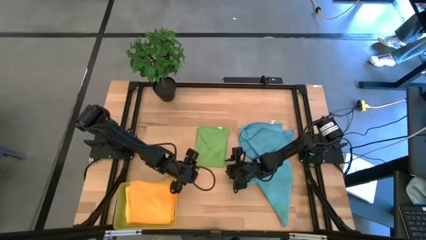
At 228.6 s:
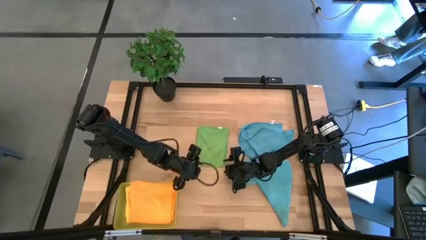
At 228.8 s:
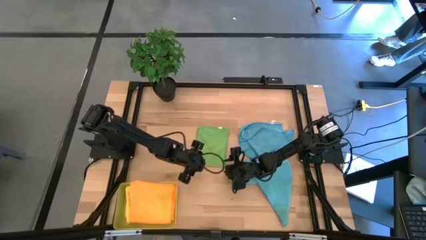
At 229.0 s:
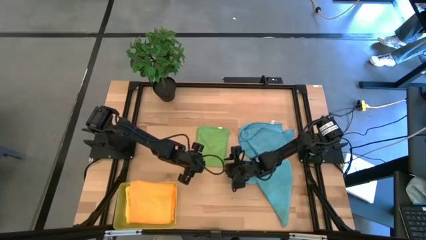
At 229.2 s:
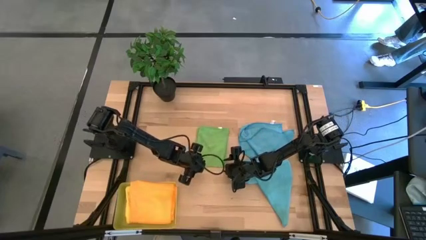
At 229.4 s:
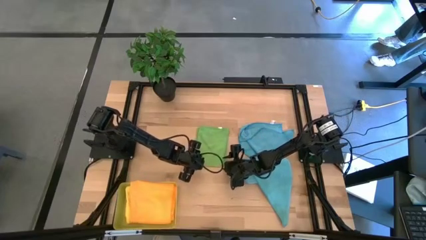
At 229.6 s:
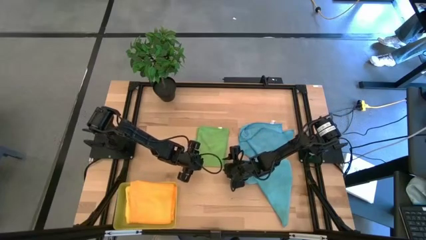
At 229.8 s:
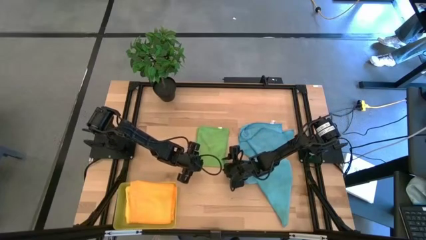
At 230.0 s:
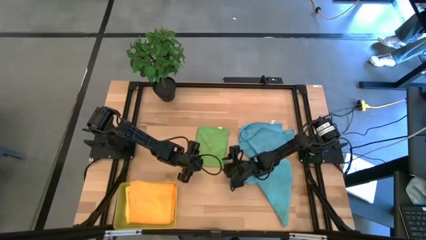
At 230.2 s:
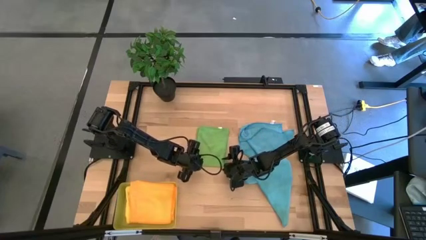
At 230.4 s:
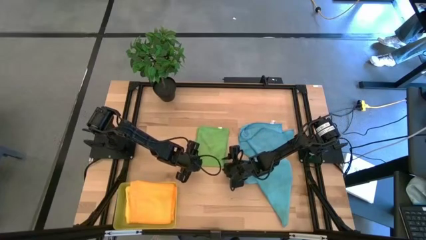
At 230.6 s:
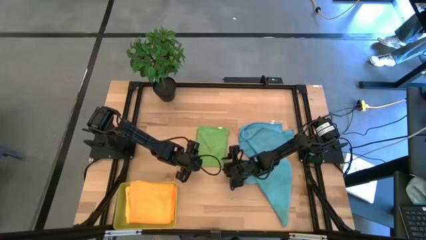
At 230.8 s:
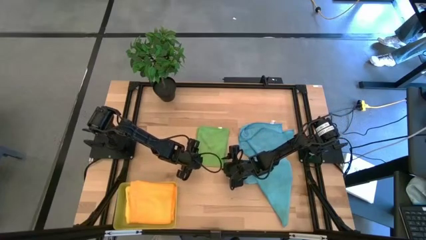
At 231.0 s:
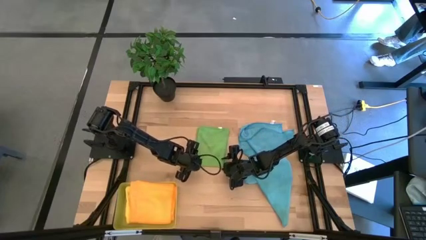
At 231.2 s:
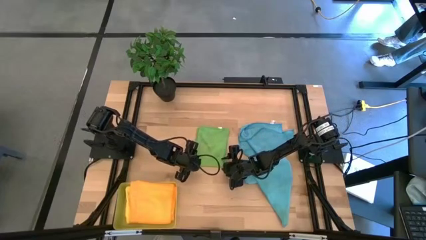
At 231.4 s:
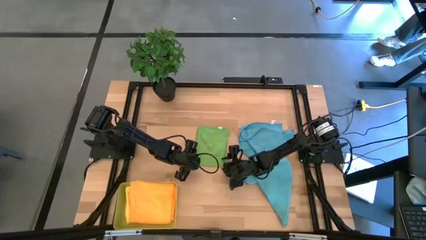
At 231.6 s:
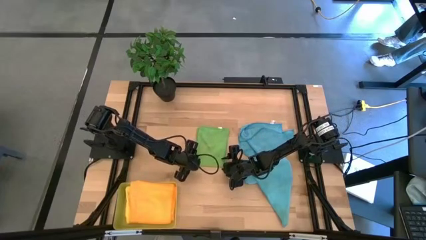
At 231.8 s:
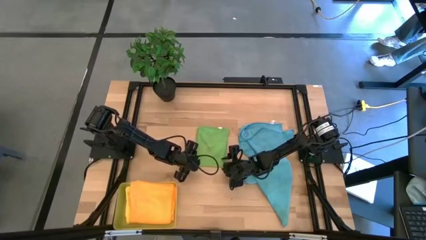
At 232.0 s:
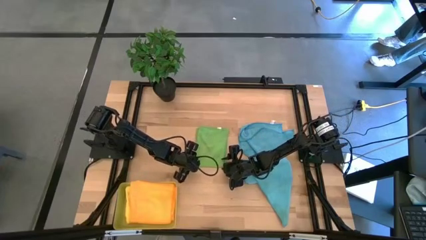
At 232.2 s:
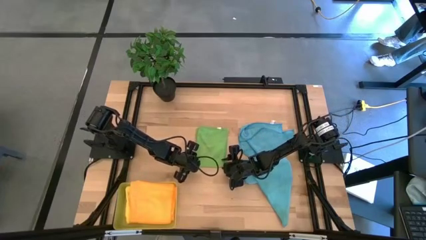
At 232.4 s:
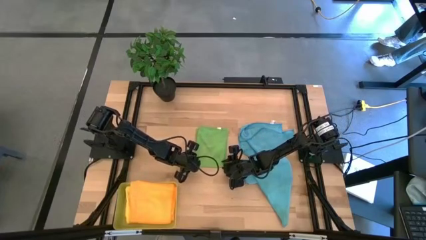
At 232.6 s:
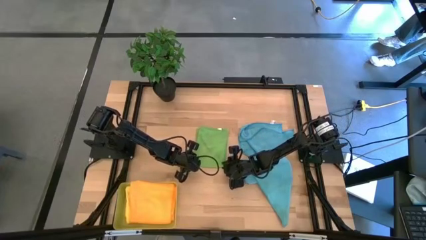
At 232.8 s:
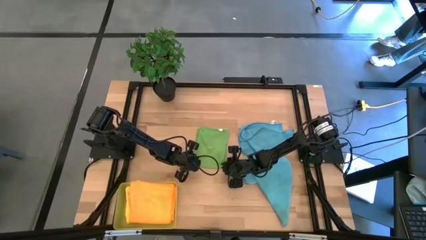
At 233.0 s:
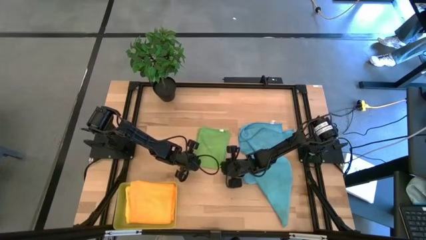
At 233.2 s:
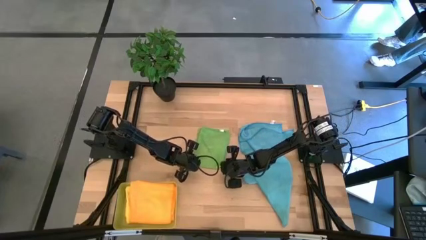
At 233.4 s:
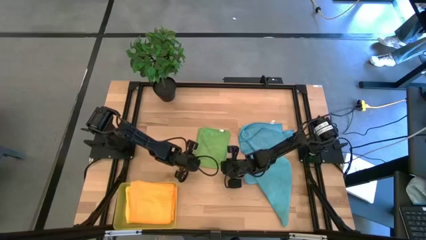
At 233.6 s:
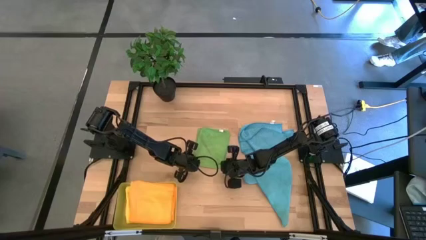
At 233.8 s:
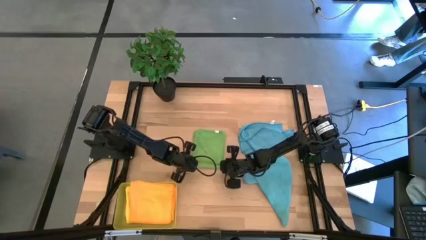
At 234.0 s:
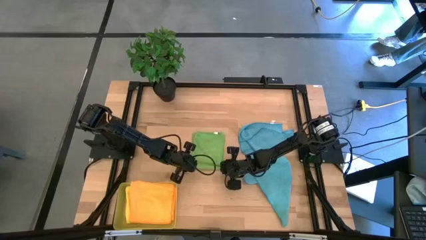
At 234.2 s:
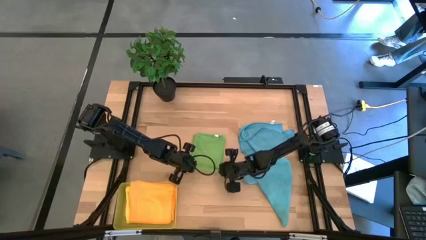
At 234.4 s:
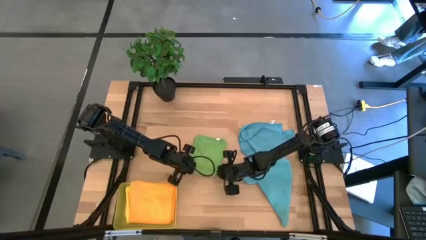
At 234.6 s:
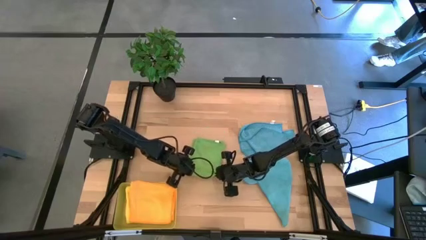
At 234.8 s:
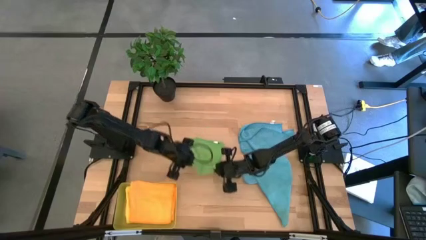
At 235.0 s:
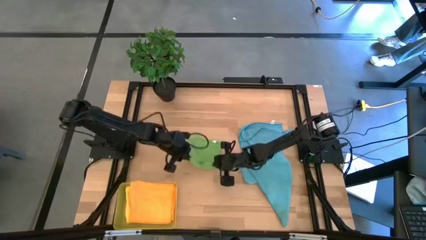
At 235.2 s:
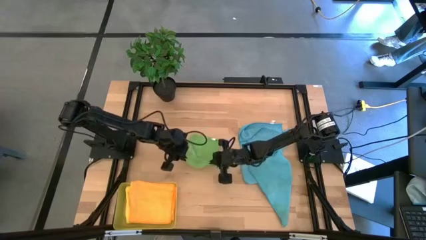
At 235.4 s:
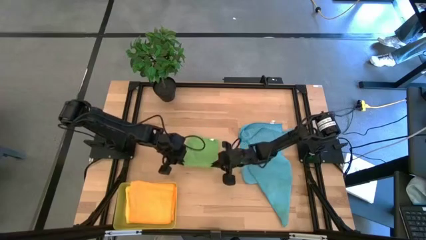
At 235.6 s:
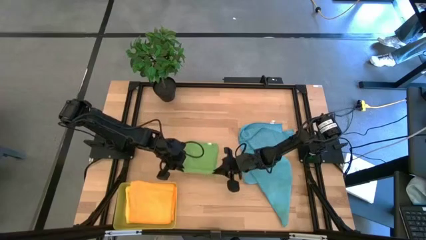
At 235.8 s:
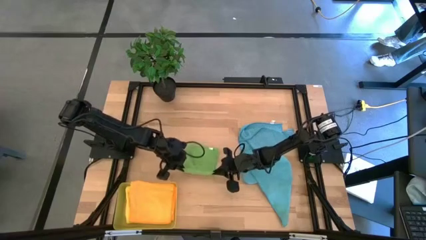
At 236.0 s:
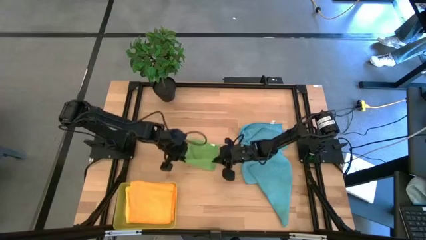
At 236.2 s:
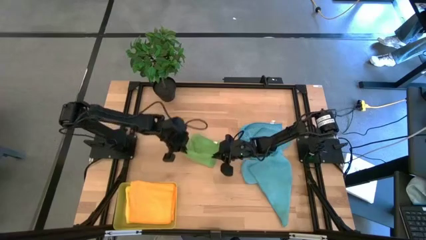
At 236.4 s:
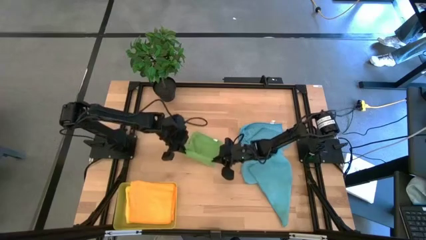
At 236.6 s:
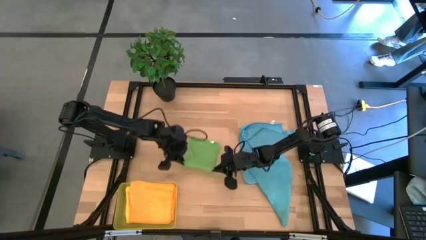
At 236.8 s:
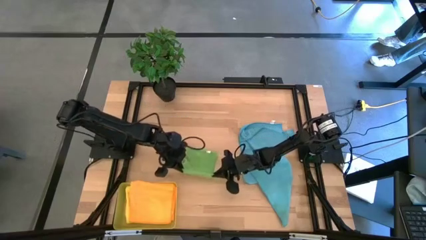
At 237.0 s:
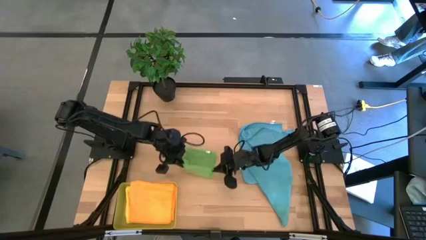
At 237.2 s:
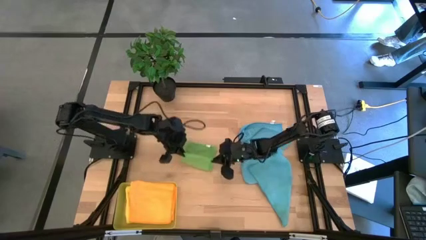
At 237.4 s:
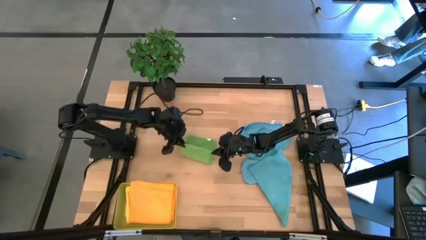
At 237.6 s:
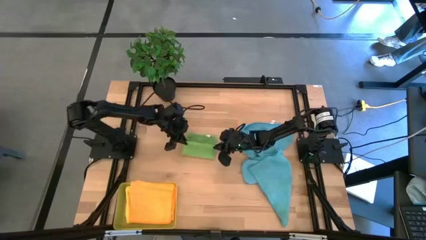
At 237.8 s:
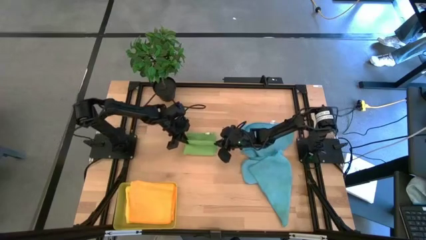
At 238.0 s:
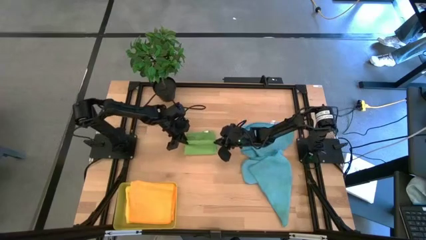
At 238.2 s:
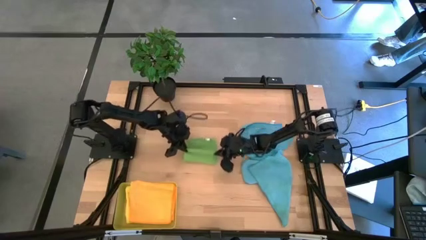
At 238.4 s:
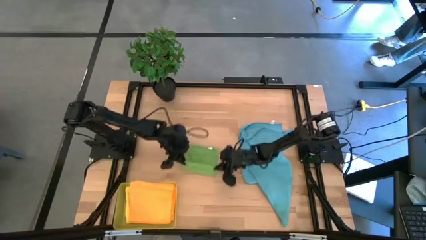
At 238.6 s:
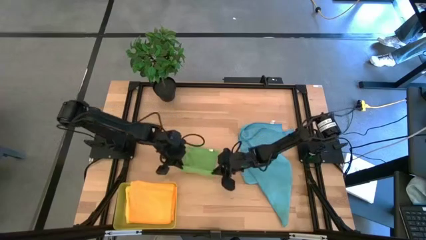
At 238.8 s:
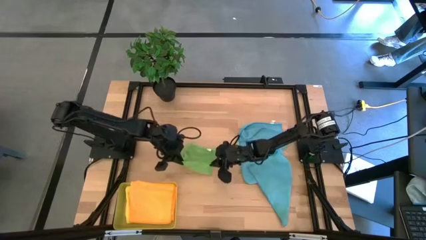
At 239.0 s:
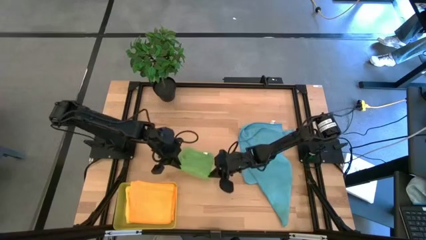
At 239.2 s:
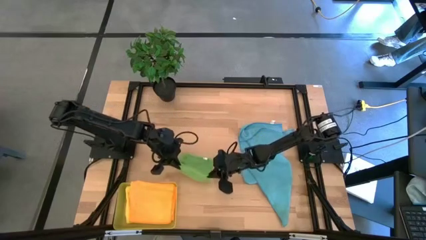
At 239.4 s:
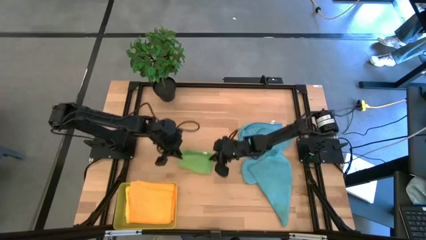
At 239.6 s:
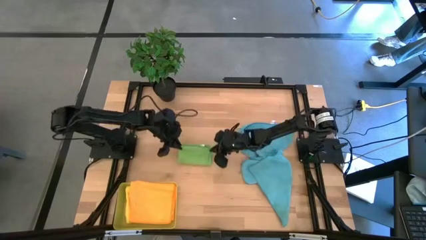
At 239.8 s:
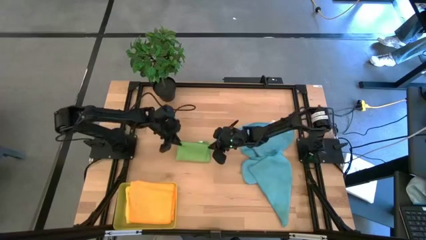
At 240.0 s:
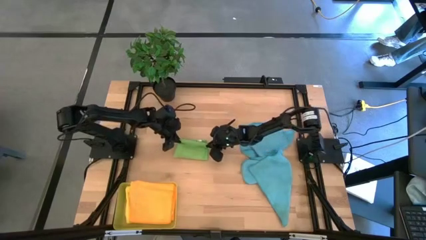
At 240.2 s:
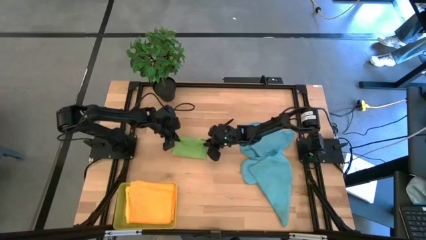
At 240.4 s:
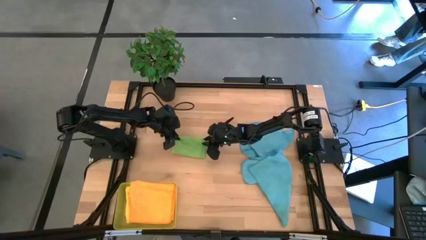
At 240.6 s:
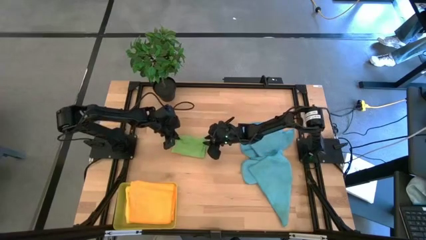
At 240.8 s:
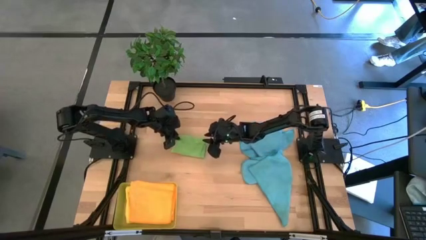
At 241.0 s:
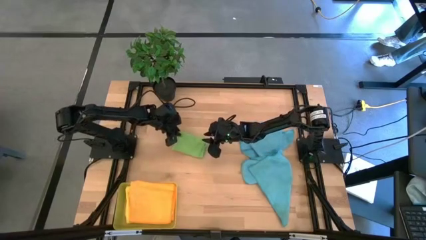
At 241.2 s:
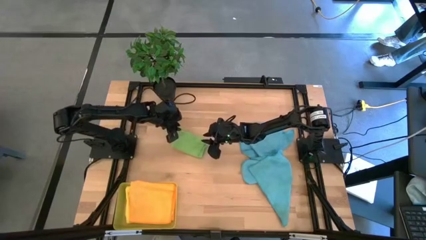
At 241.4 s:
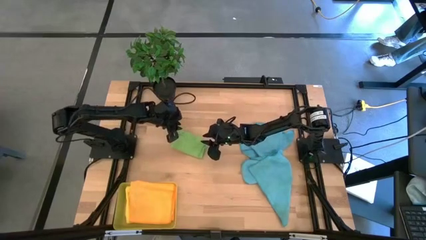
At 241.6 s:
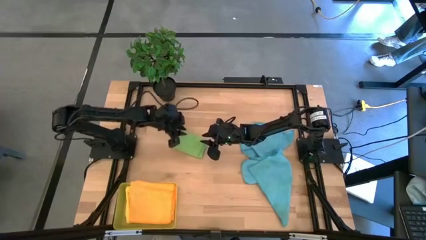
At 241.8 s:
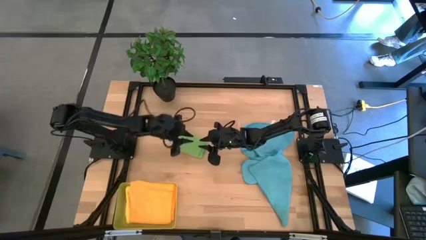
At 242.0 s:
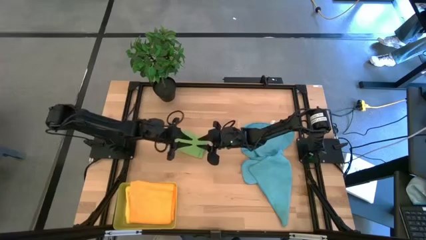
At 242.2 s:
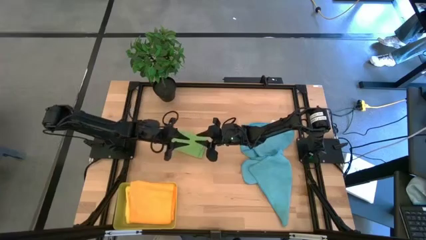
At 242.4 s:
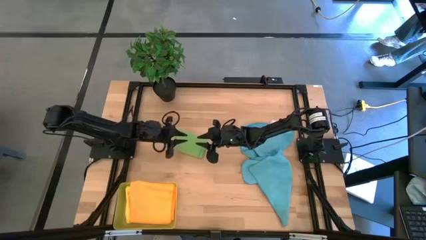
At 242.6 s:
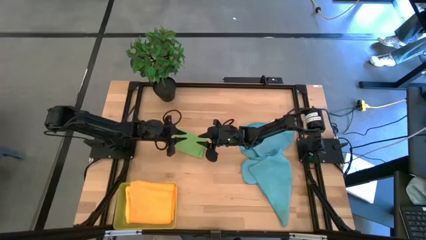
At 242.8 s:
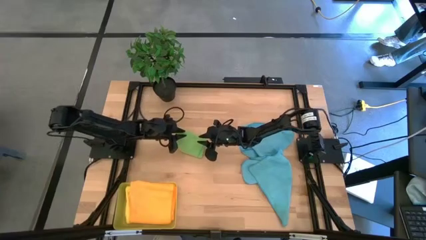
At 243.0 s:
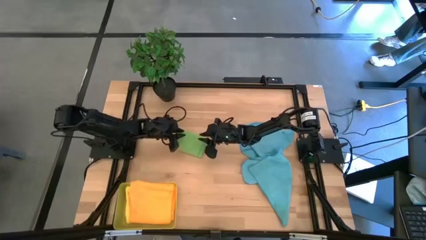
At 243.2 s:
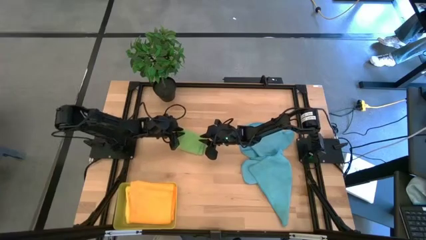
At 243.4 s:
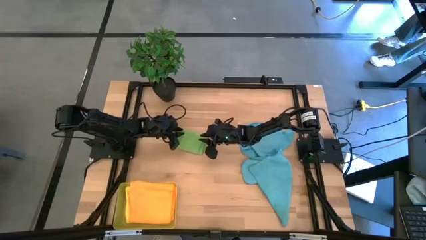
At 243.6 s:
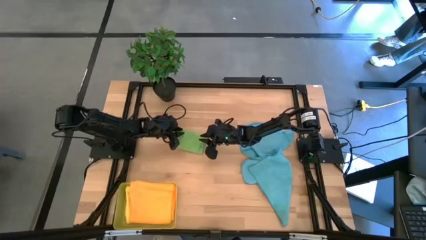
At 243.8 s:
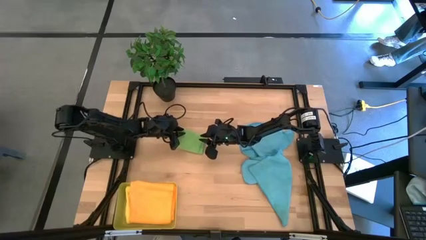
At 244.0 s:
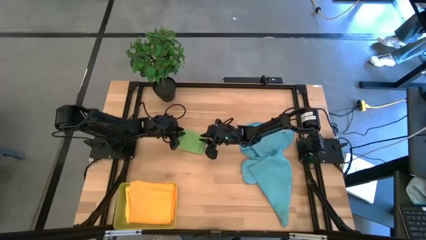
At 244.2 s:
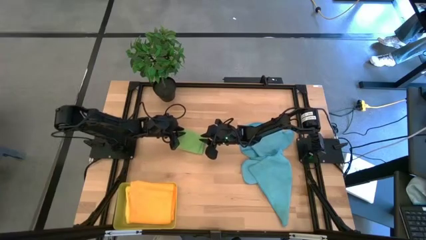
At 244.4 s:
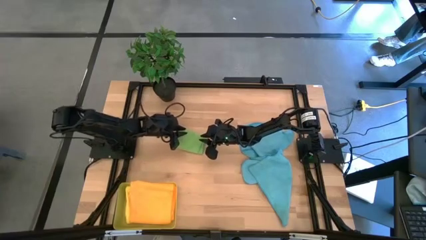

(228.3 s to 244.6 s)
Task: Fold microfiber towels
Fold the green microfiber cloth
